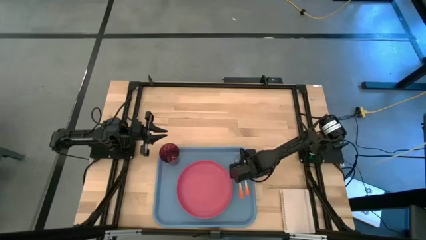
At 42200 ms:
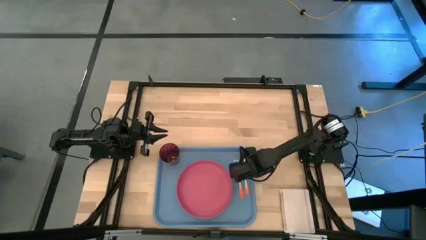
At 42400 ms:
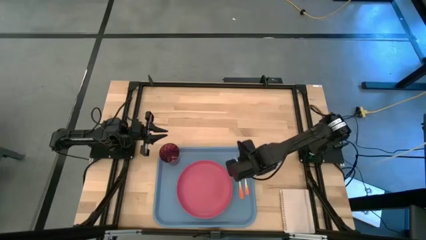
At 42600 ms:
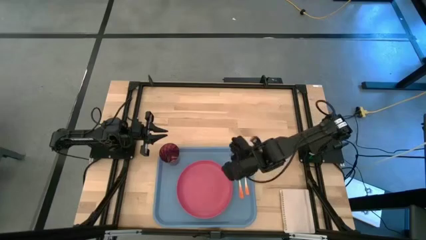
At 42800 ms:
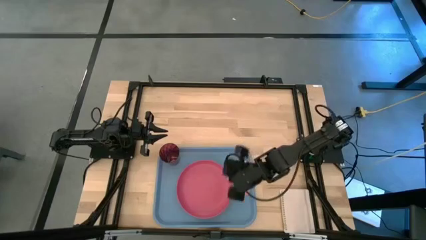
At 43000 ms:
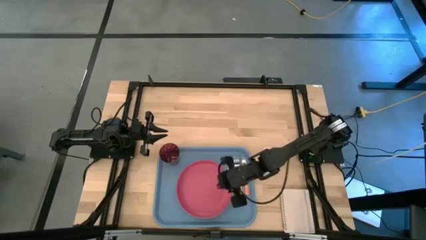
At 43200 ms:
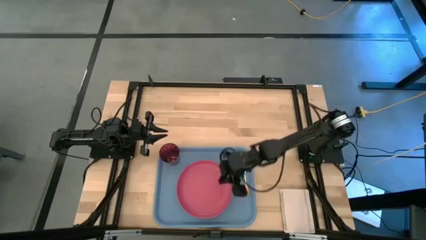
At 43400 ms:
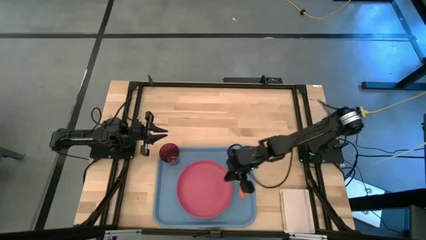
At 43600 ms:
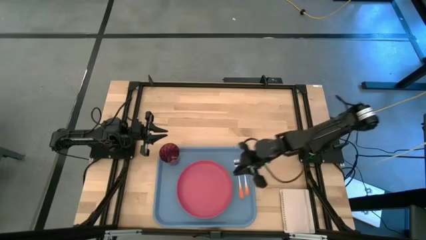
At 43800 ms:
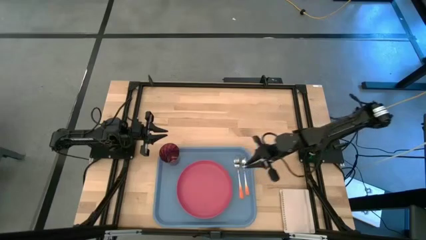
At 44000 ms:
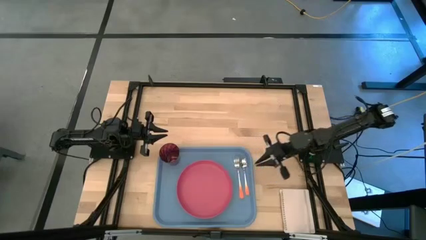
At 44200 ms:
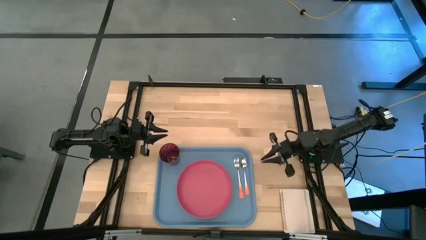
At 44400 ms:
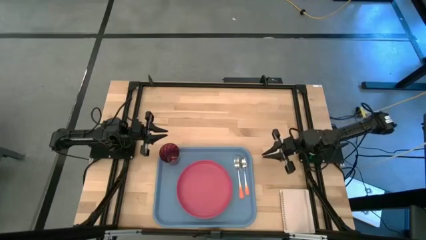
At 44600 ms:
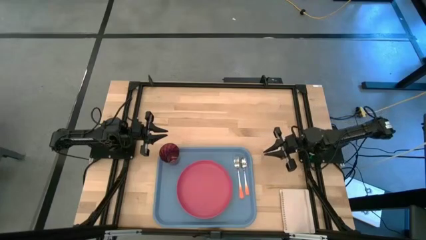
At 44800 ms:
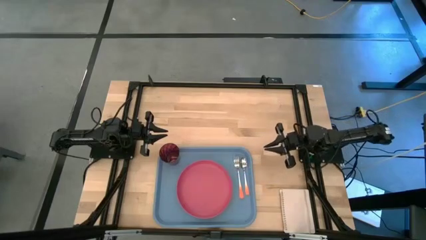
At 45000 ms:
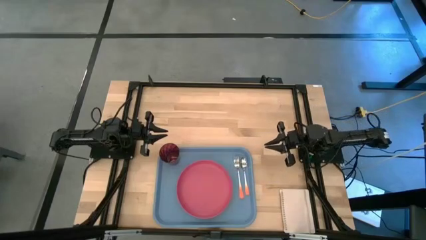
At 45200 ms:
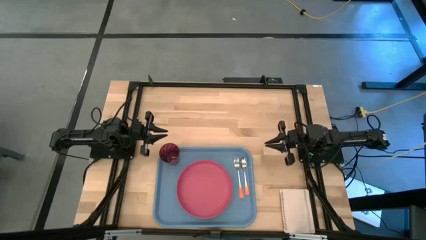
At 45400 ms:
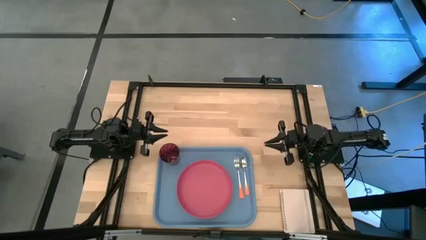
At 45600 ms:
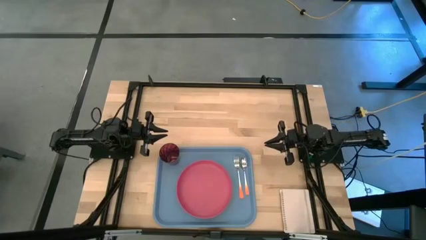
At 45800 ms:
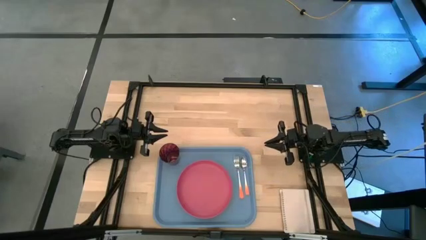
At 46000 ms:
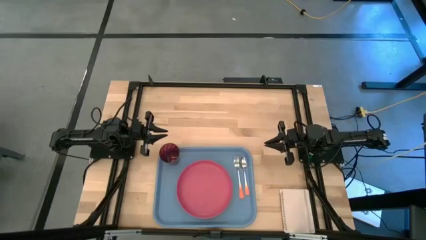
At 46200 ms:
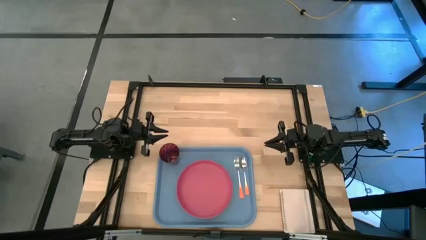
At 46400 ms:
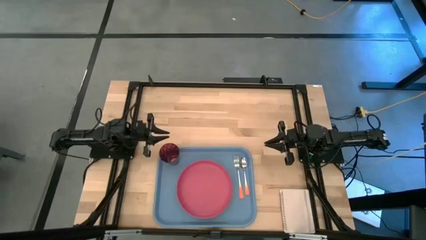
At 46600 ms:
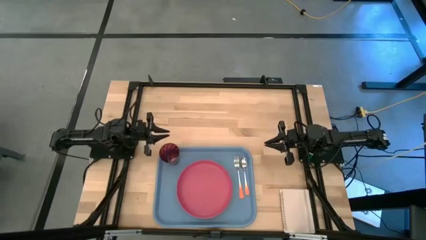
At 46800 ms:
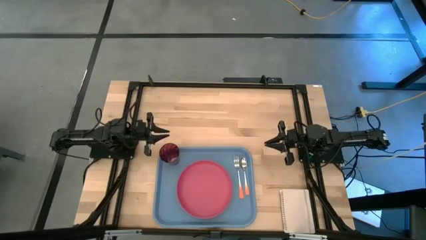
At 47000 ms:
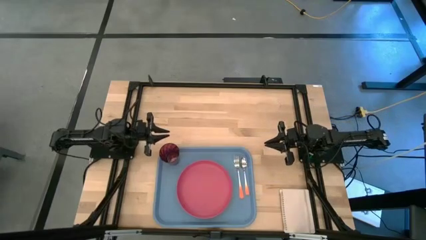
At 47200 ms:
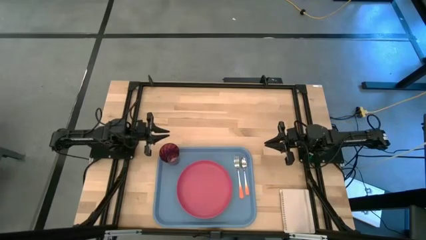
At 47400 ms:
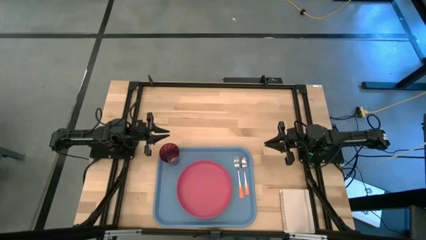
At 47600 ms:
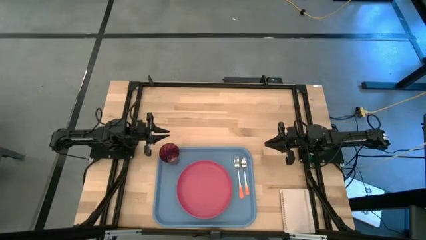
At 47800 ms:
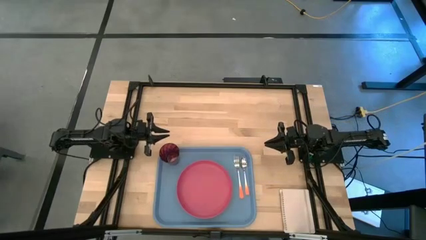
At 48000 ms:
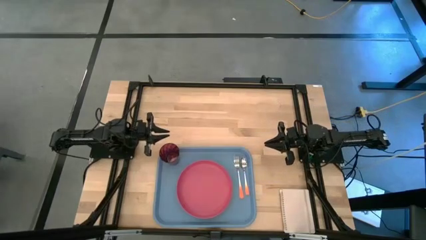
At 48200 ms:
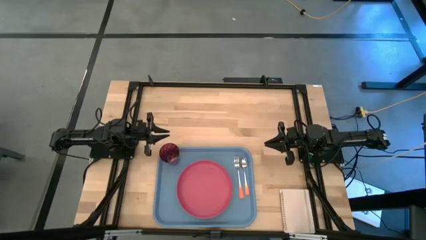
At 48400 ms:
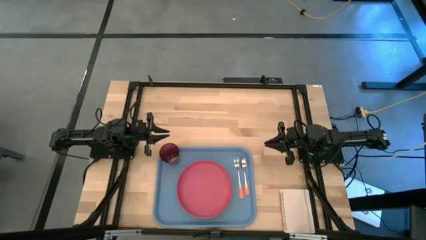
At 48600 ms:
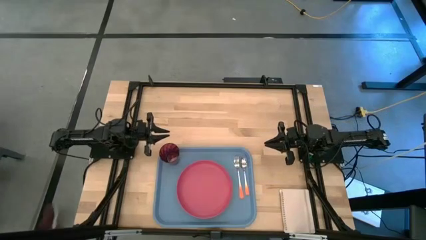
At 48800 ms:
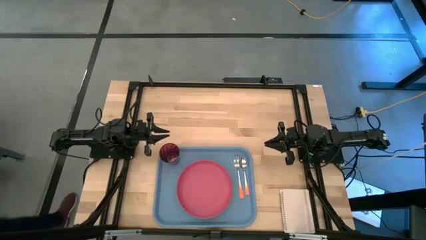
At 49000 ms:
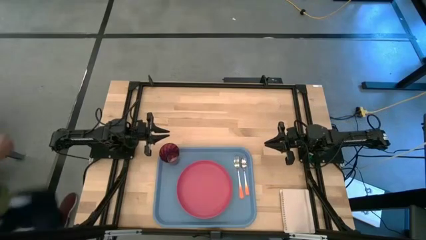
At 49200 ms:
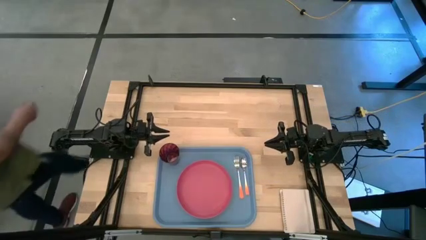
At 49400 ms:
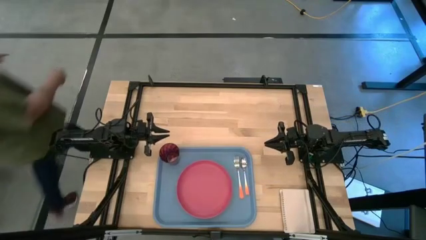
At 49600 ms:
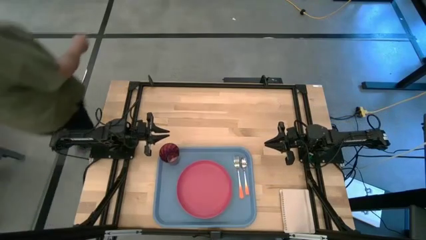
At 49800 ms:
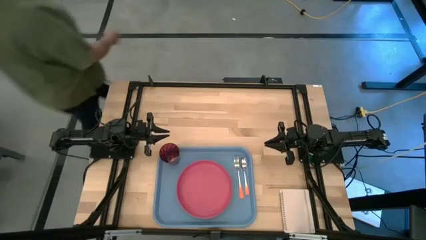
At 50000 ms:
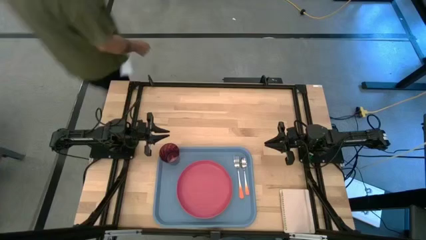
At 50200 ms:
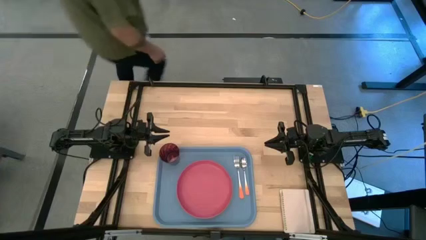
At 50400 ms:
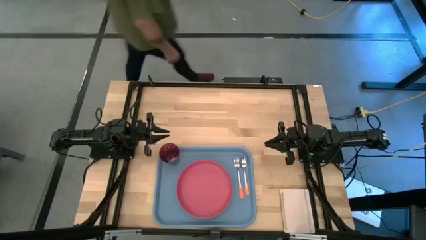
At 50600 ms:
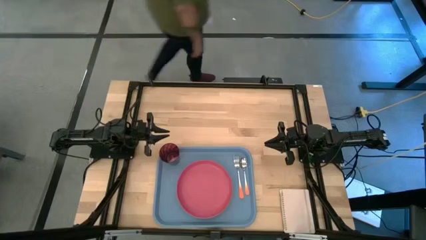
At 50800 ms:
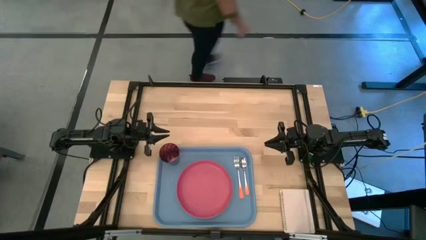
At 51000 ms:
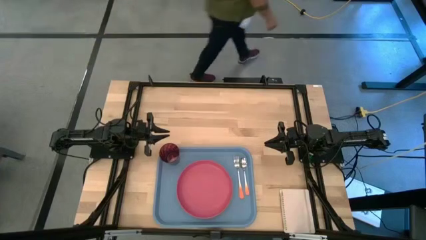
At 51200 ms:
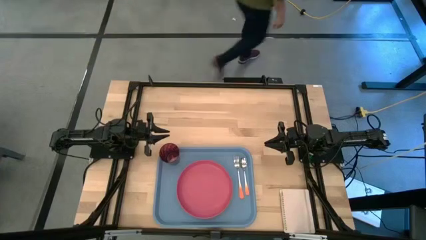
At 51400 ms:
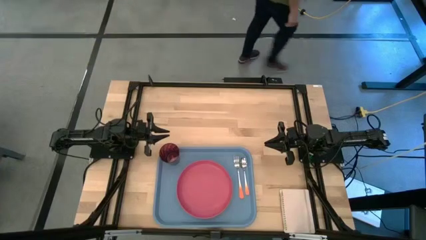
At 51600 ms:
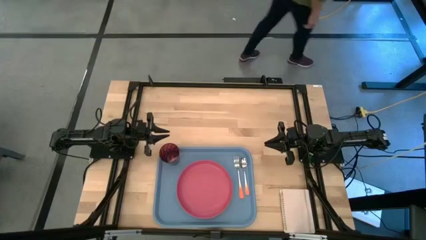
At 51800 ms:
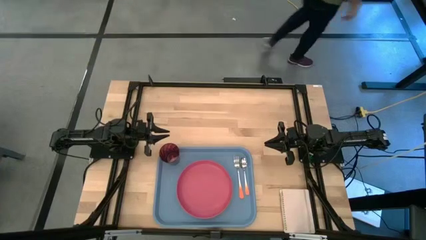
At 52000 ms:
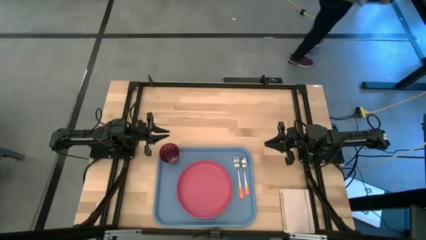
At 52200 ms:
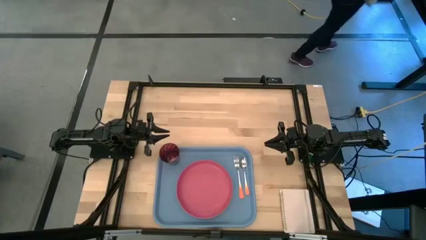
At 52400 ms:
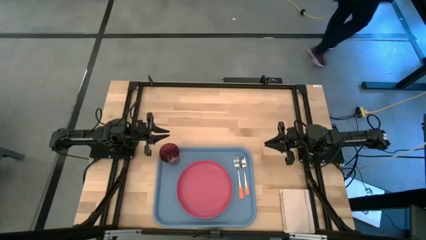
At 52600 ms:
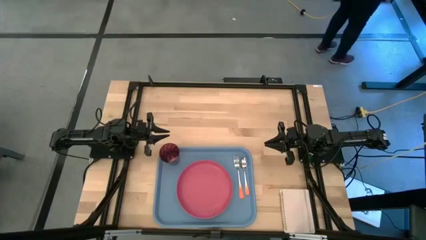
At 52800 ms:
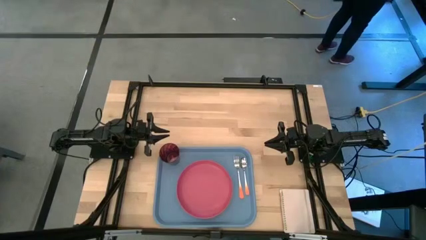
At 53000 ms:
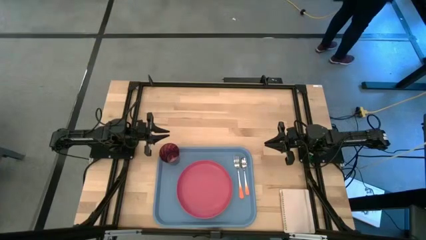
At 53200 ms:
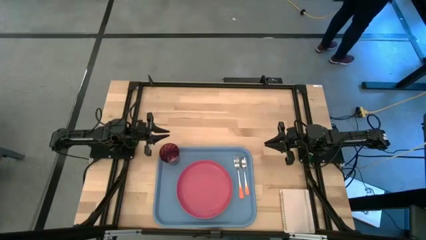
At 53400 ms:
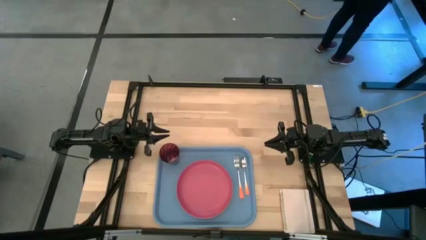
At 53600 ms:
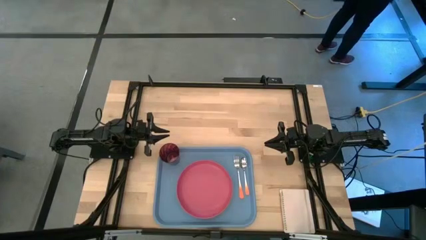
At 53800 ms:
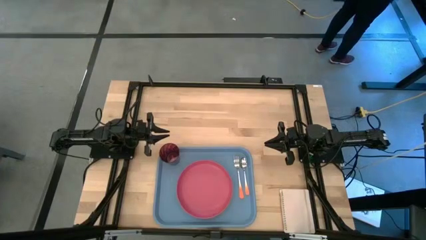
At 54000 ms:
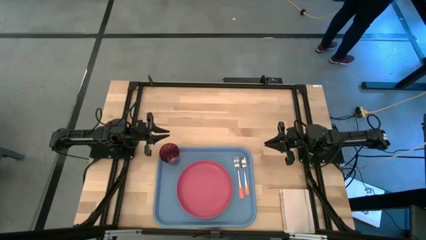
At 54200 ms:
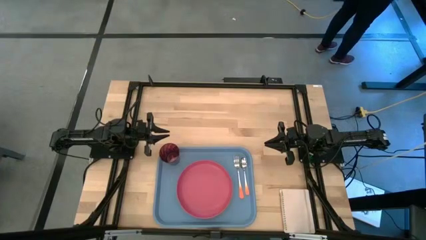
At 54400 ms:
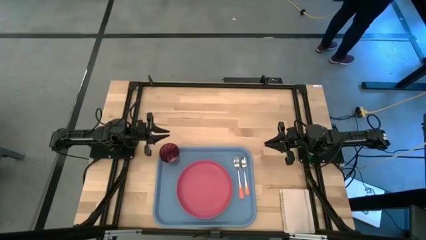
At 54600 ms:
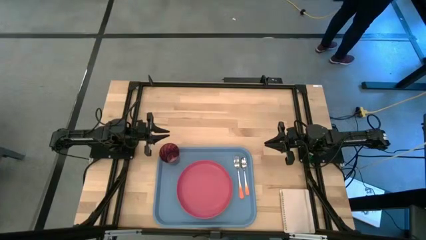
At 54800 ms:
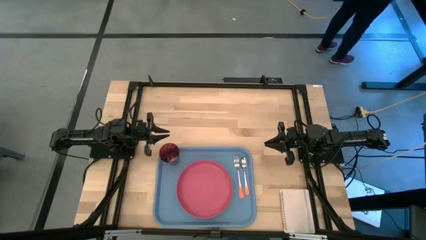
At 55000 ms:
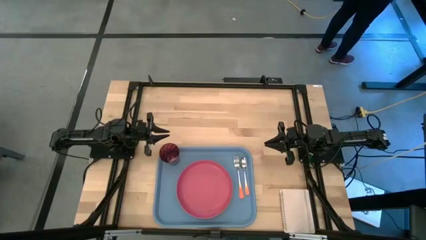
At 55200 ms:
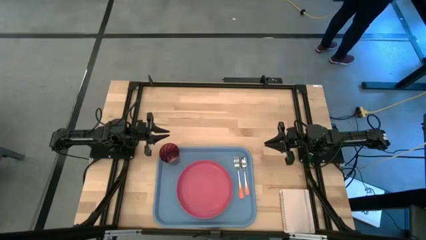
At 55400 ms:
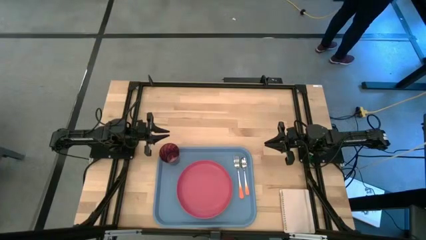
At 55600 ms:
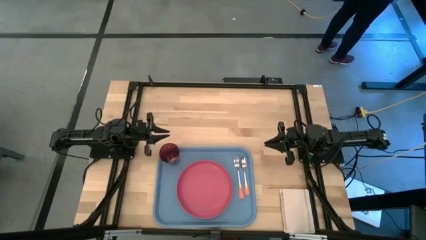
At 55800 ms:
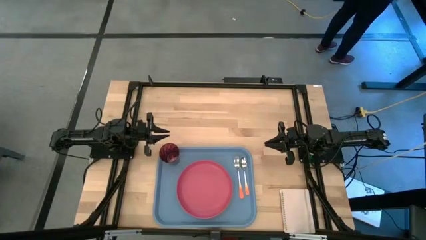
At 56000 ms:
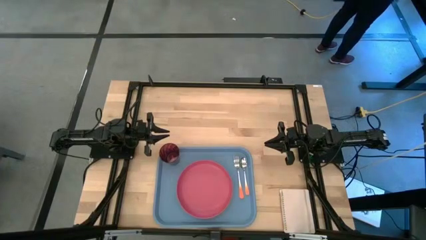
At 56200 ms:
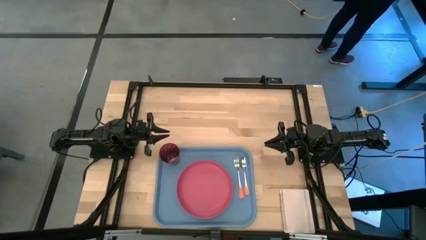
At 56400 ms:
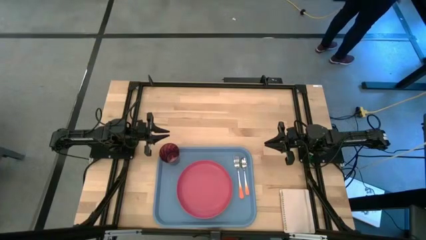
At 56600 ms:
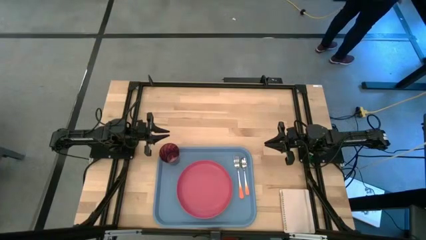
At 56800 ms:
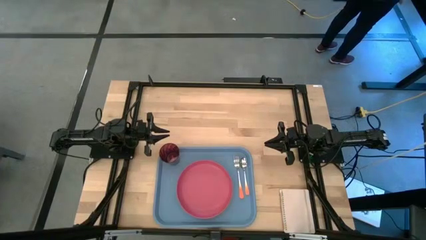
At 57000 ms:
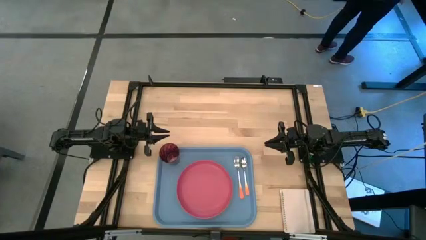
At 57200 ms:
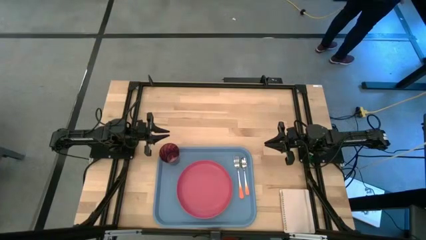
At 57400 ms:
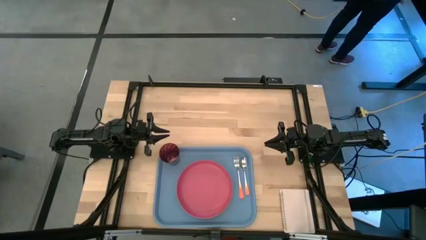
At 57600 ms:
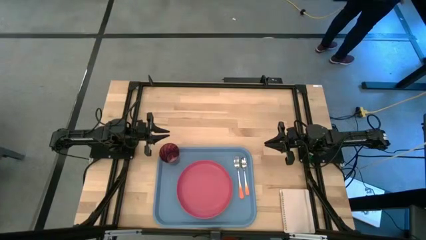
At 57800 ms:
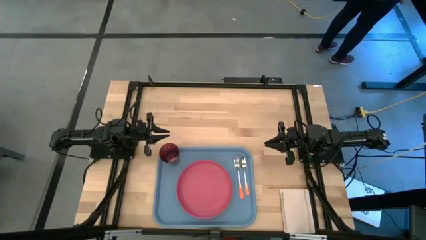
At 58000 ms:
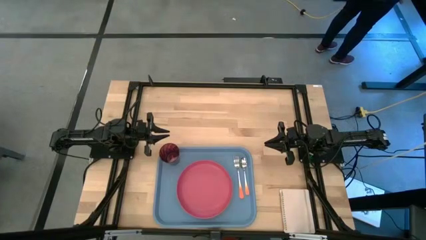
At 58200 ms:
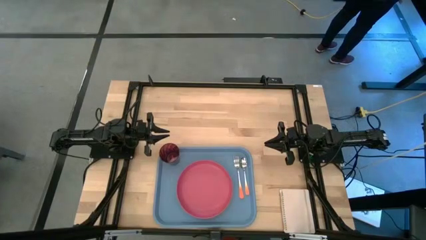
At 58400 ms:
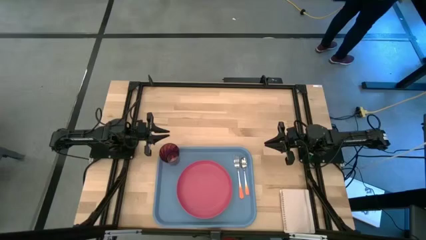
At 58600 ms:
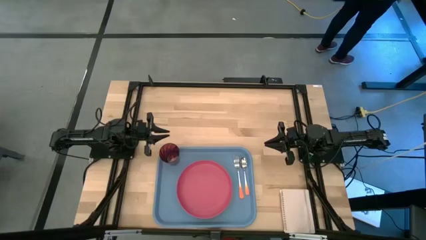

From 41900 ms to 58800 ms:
Task: Pick and place plate/cup/fork/spoon on tray
Return to Home Position
